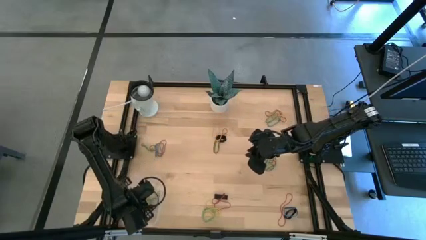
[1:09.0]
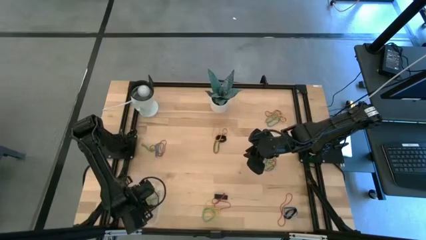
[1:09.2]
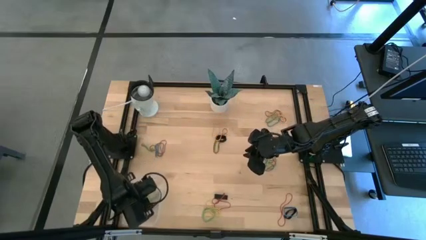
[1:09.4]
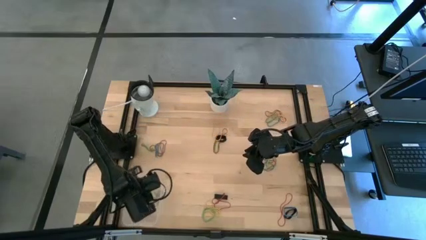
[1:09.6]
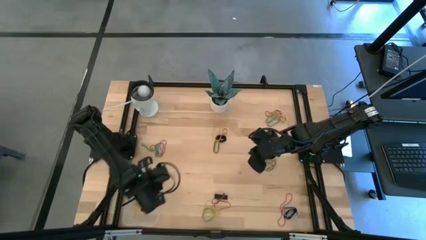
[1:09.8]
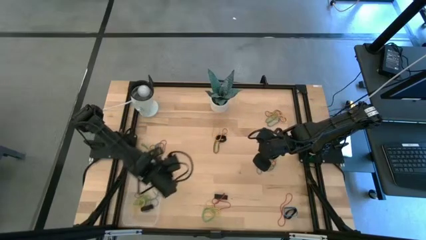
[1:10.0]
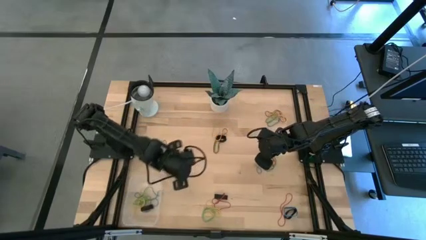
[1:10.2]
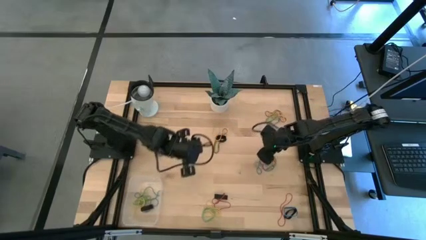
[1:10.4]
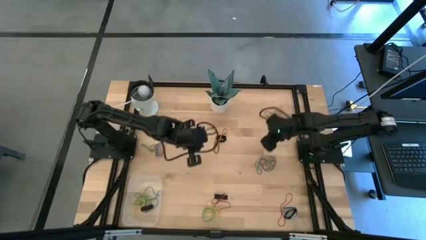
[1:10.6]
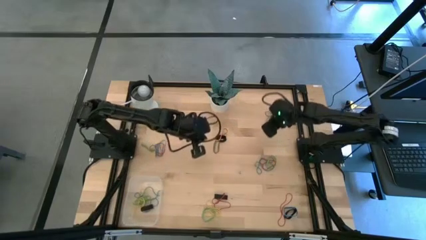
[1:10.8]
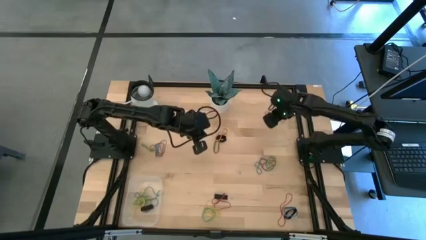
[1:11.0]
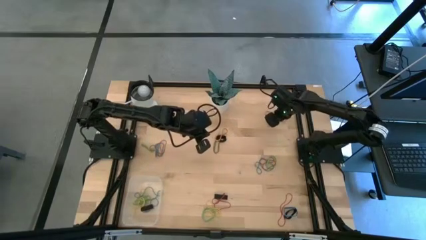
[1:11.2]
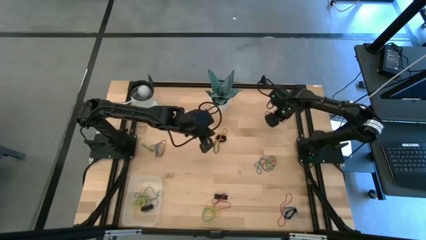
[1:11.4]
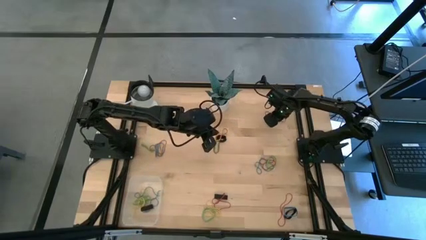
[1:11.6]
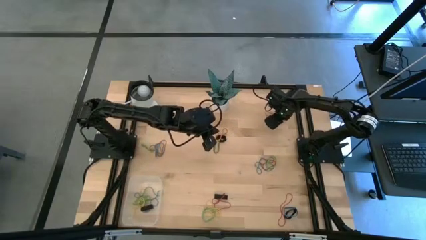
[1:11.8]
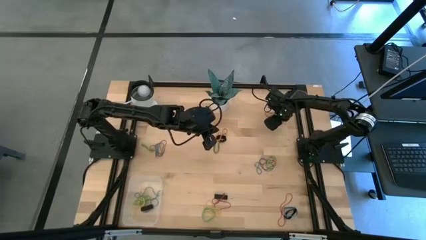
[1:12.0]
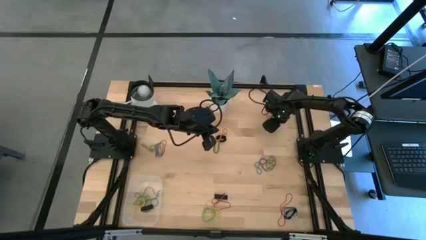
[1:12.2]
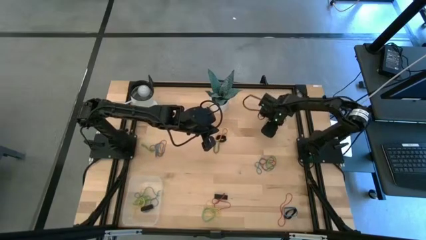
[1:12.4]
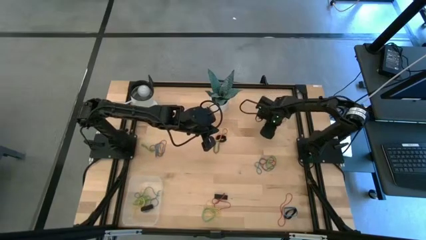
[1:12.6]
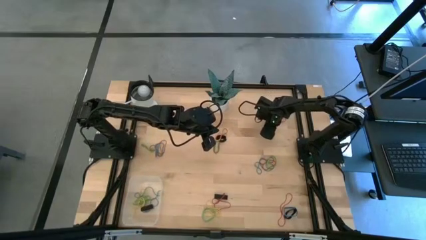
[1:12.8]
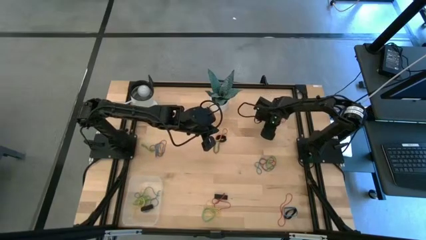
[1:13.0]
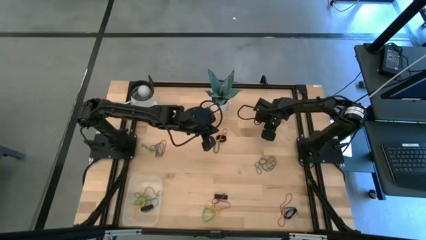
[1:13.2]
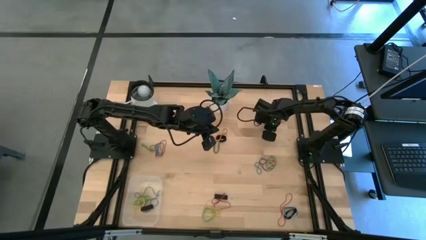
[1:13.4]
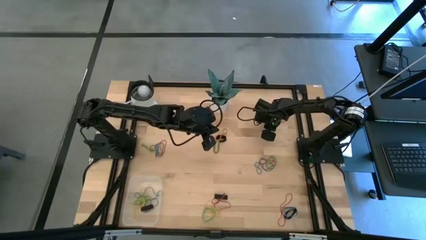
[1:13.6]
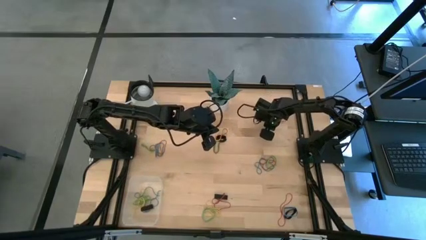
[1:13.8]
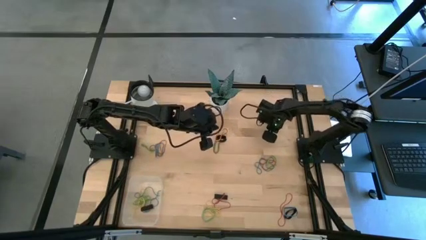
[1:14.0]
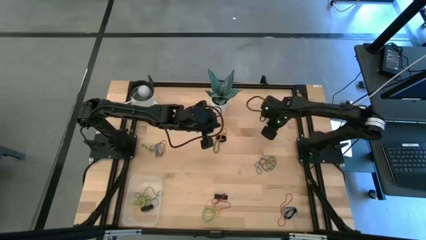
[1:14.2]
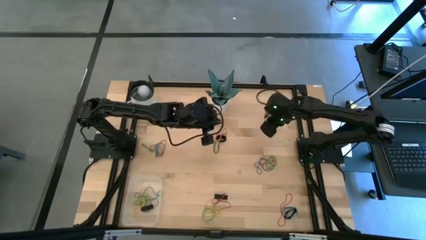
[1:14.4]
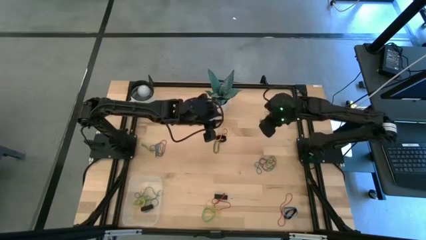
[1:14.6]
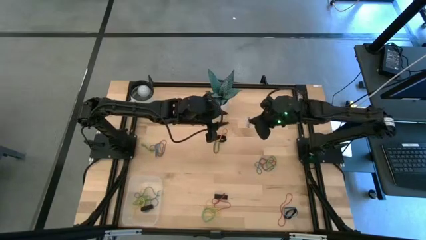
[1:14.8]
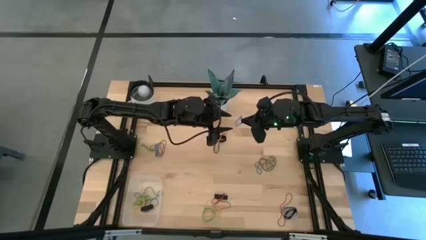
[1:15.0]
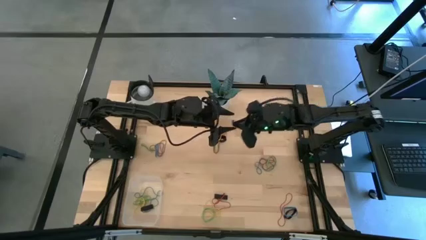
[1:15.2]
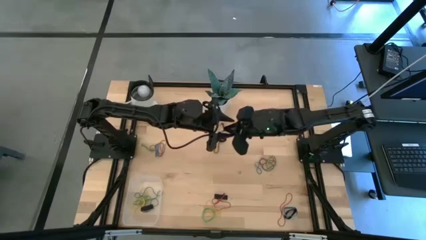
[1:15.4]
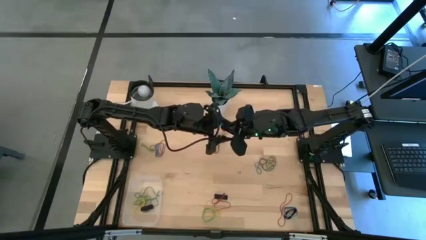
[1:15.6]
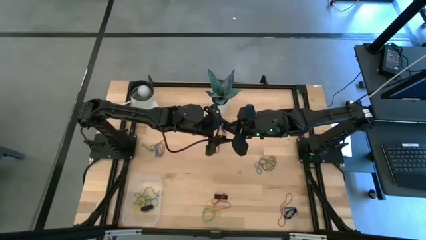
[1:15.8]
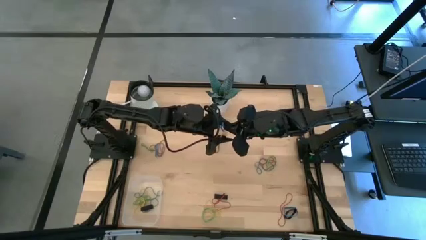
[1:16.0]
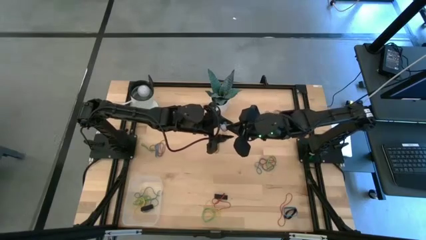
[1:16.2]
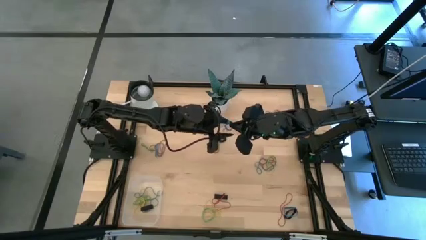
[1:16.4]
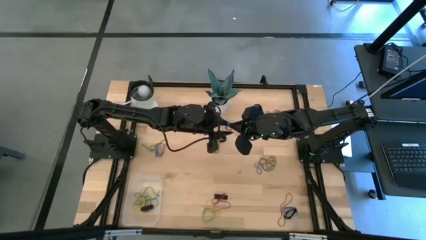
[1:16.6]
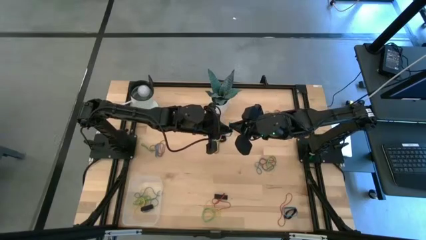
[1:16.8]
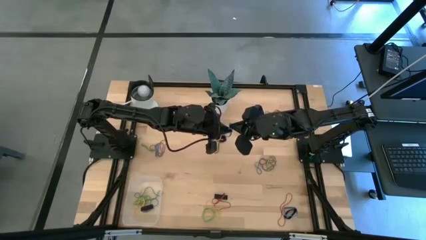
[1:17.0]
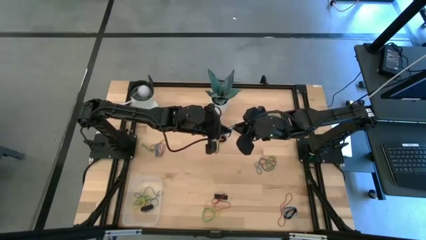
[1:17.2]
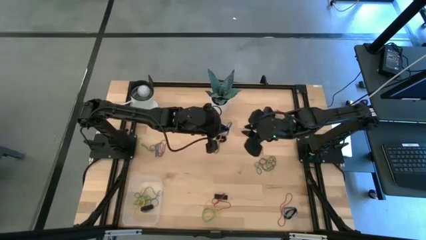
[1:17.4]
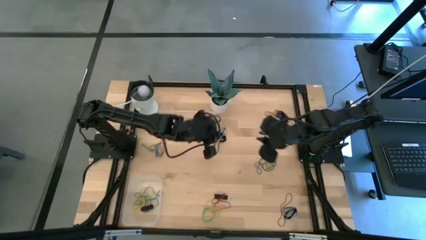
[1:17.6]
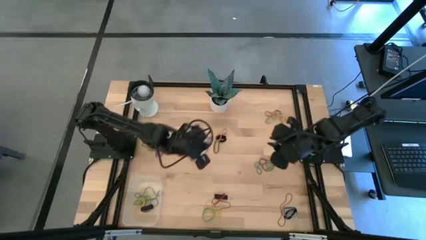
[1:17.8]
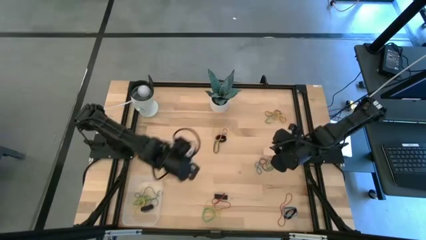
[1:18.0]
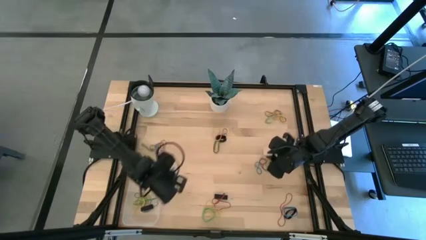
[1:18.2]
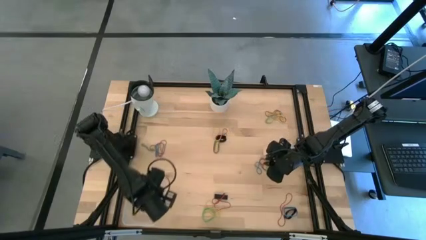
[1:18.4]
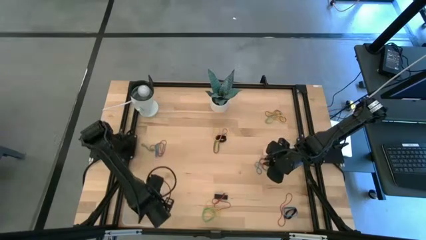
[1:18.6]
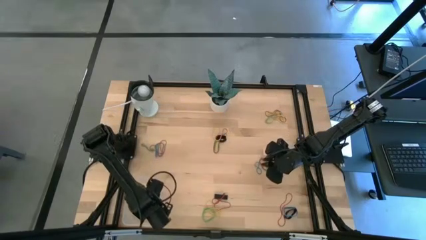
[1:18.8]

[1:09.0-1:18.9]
Task: Pick and place rubber bands into bin
Put the blue rubber band into the transparent bin

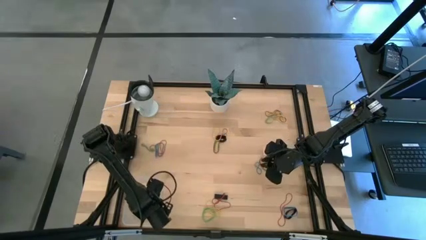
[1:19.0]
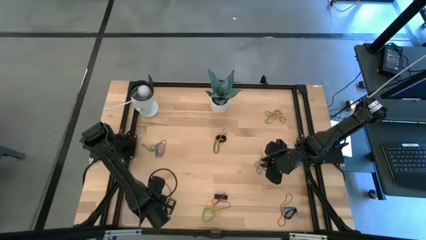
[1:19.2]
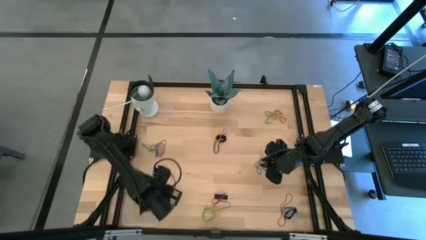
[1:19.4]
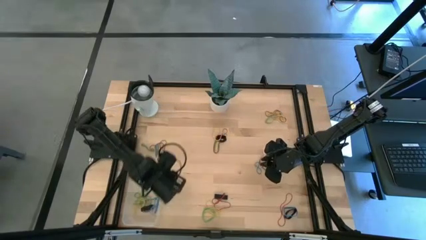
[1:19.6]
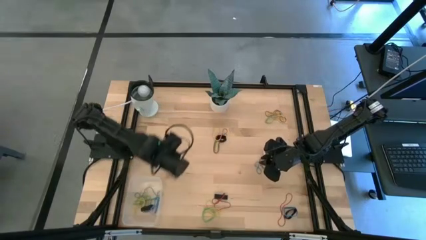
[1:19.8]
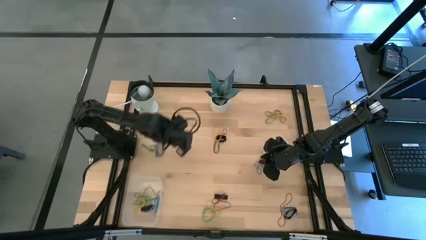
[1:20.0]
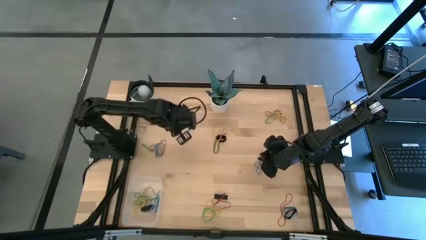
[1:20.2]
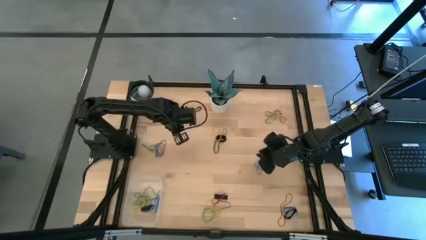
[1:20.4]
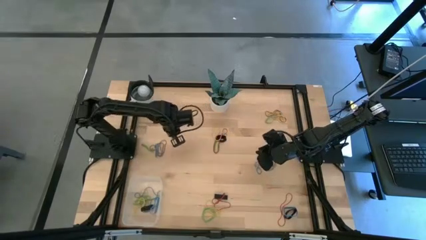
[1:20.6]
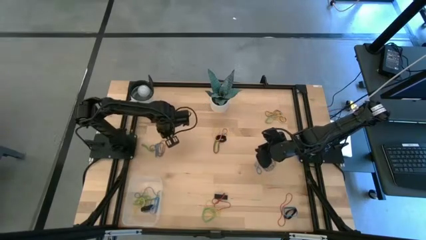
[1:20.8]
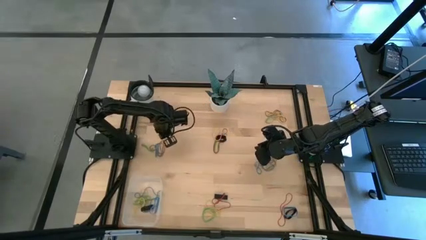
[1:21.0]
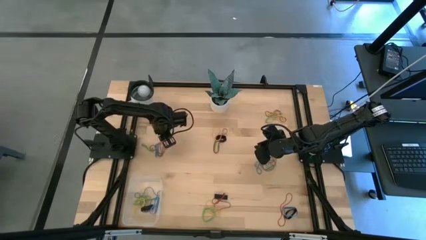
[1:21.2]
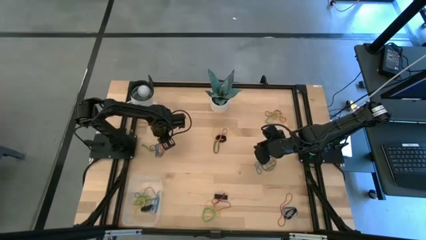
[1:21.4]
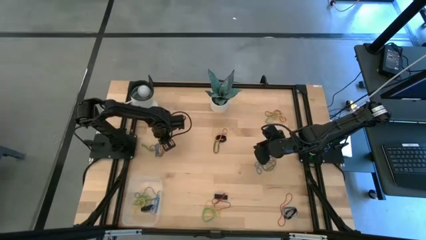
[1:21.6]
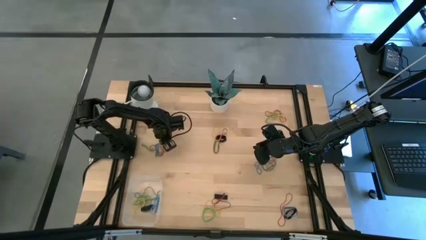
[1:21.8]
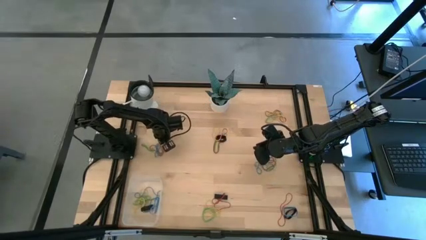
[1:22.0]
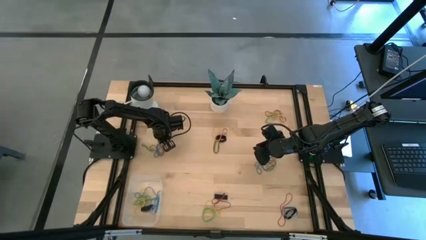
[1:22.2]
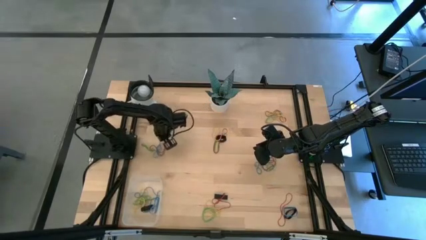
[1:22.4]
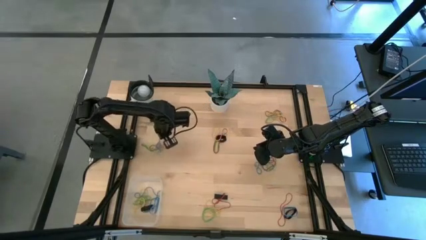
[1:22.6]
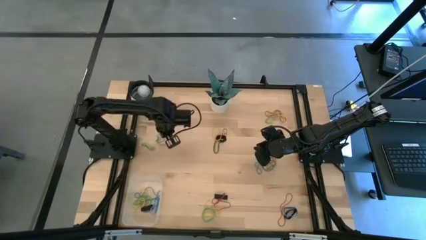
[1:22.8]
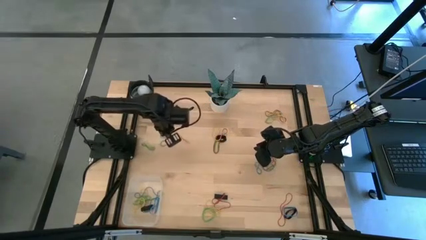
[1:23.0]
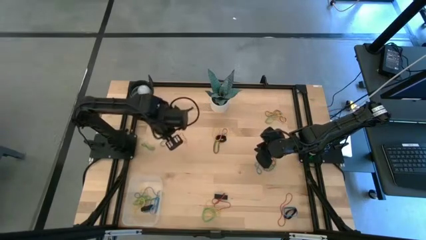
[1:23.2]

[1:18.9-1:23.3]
Put the red rubber band into the transparent bin

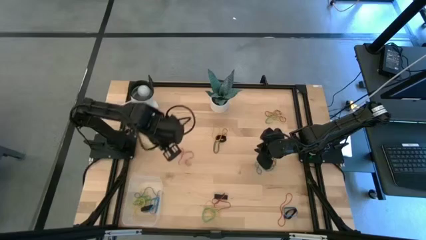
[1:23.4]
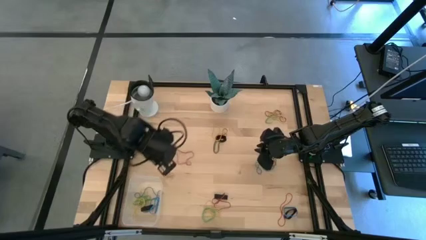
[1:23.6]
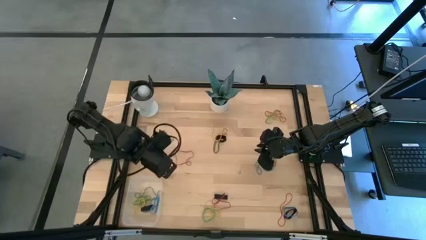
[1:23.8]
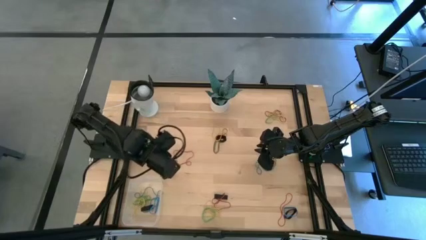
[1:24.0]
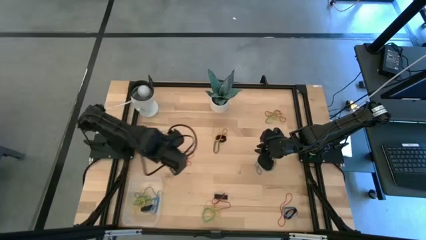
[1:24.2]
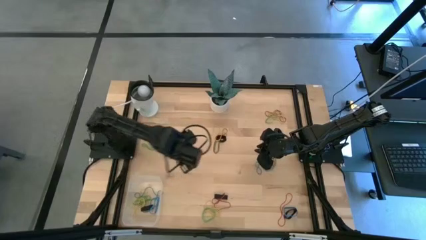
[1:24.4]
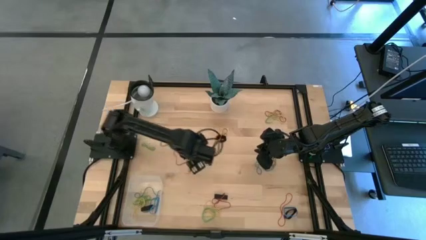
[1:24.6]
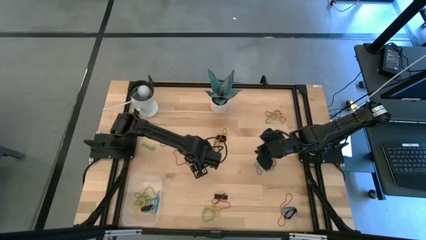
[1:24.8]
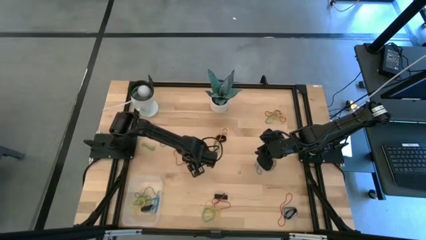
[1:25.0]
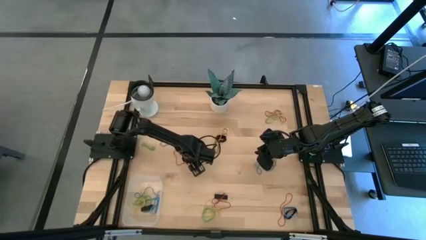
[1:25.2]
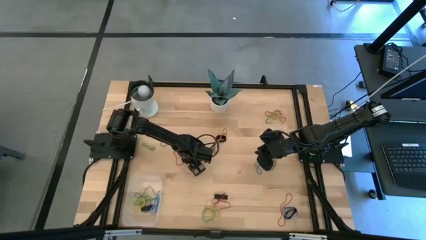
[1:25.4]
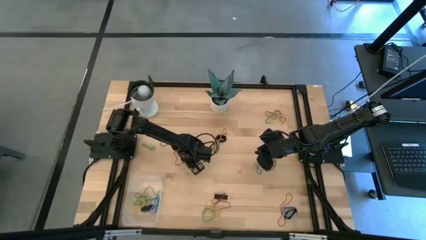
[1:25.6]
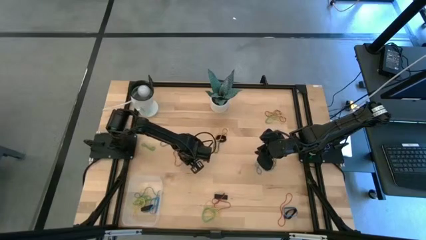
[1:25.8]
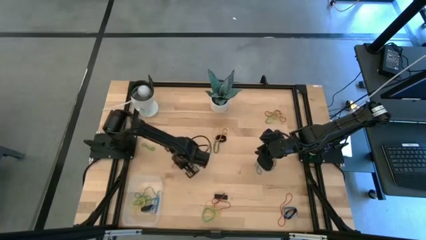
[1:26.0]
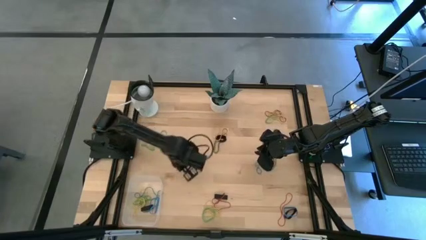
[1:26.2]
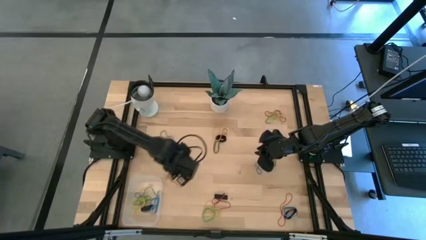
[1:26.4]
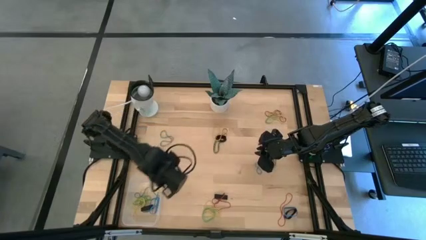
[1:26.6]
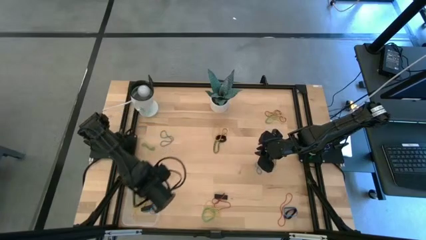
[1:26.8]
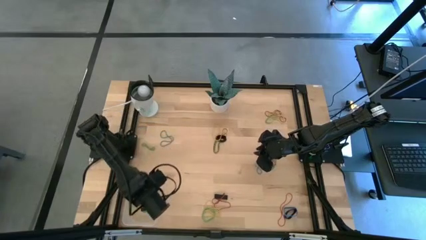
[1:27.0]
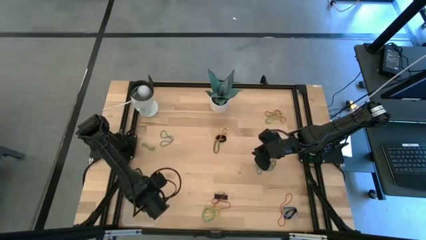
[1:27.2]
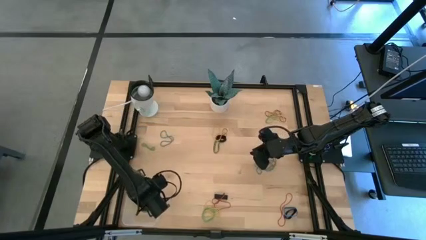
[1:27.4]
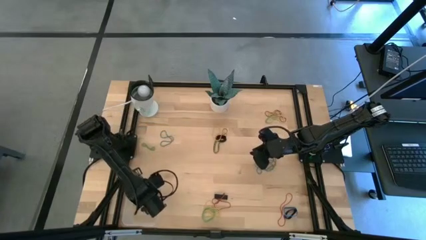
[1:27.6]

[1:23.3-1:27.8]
Put the red rubber band into the transparent bin
